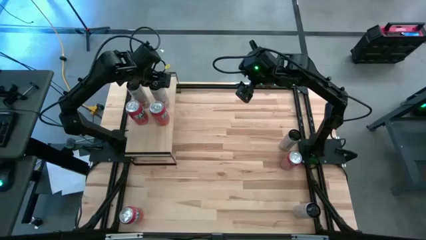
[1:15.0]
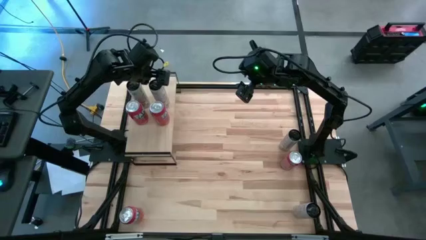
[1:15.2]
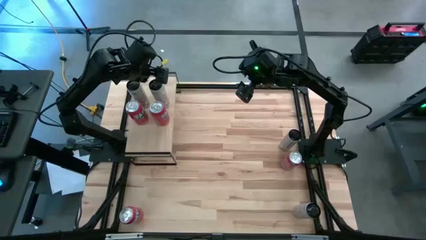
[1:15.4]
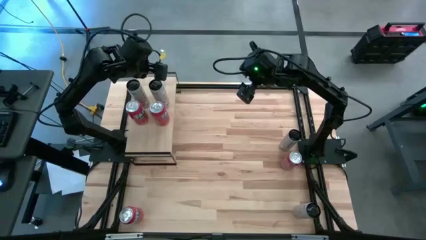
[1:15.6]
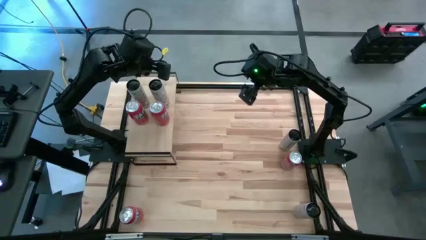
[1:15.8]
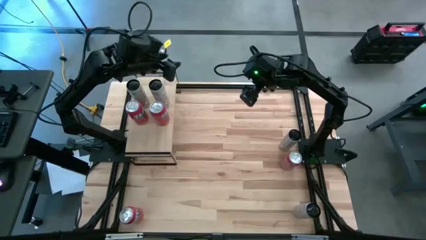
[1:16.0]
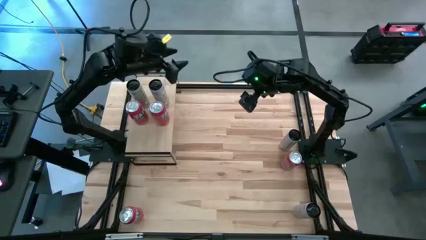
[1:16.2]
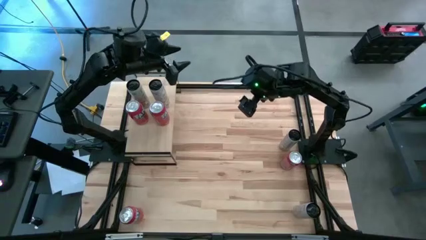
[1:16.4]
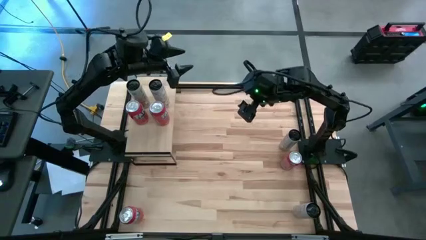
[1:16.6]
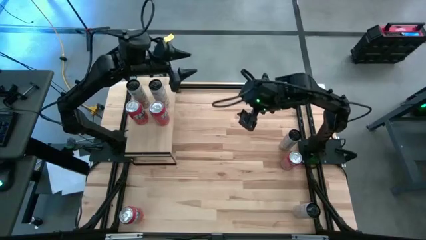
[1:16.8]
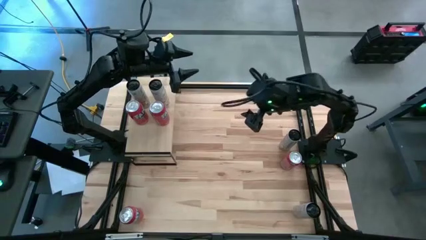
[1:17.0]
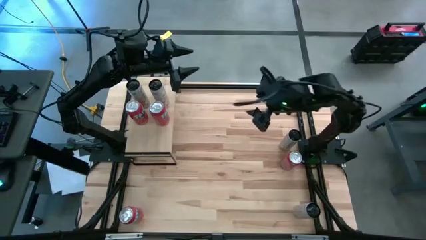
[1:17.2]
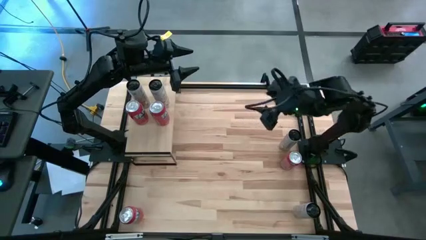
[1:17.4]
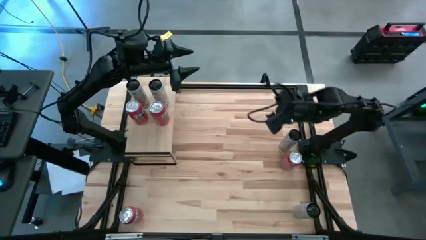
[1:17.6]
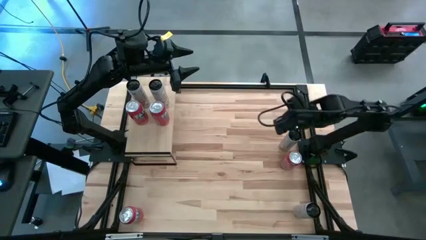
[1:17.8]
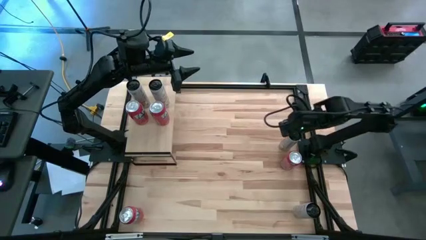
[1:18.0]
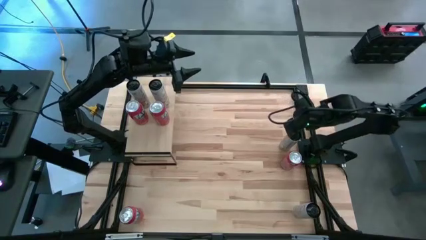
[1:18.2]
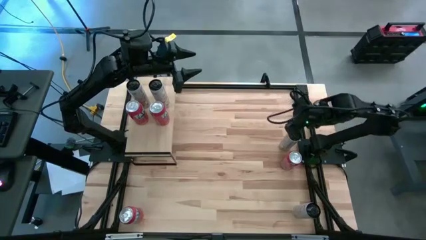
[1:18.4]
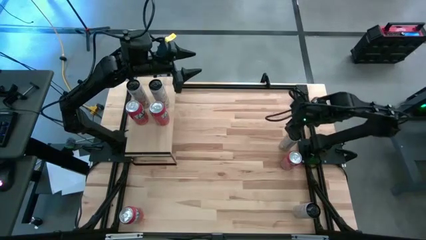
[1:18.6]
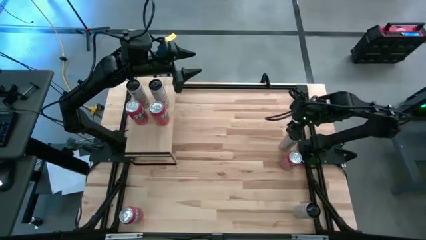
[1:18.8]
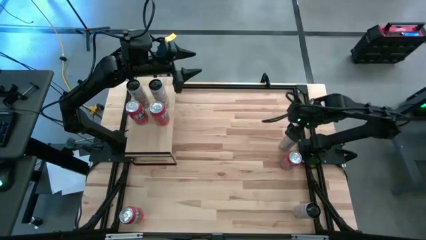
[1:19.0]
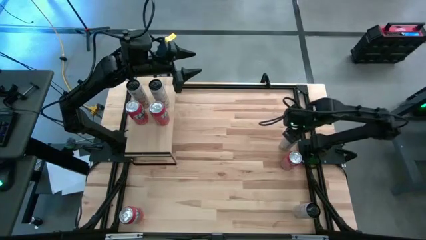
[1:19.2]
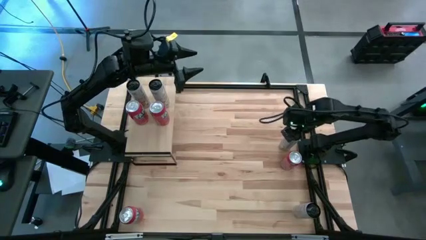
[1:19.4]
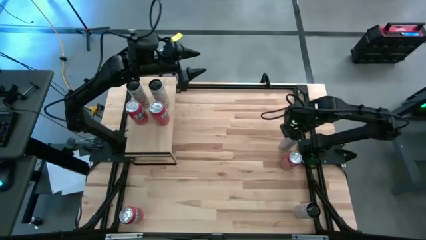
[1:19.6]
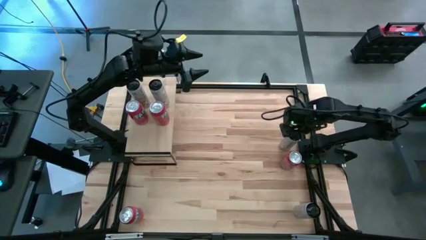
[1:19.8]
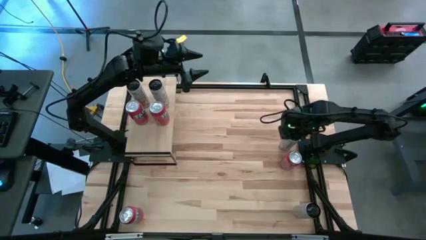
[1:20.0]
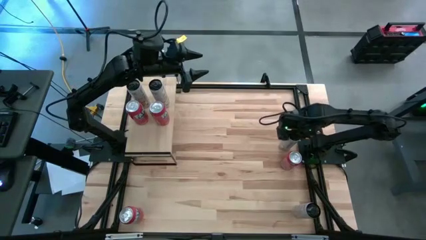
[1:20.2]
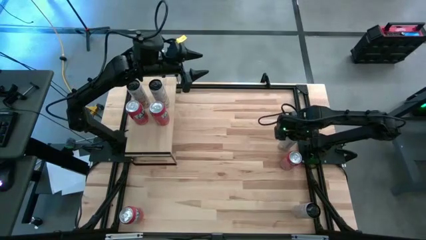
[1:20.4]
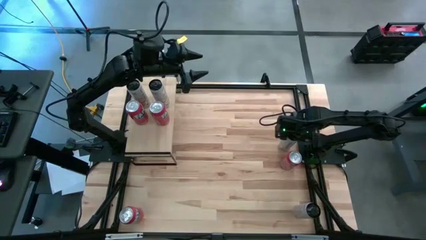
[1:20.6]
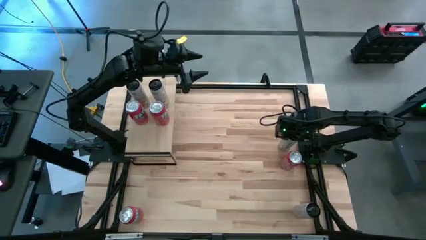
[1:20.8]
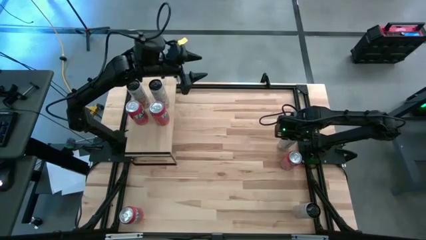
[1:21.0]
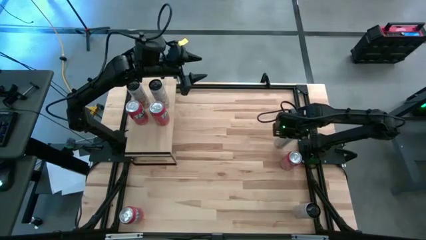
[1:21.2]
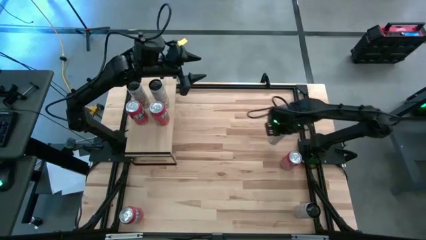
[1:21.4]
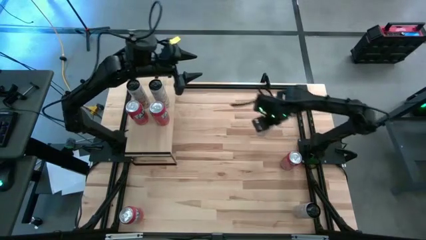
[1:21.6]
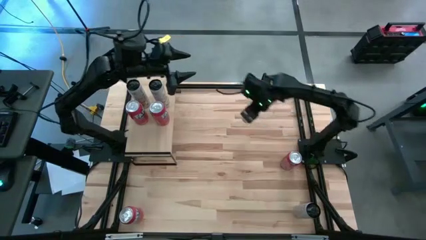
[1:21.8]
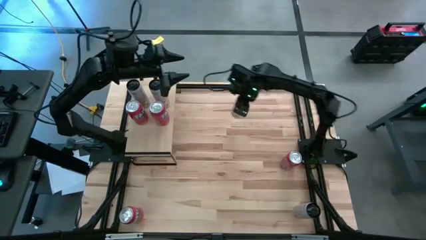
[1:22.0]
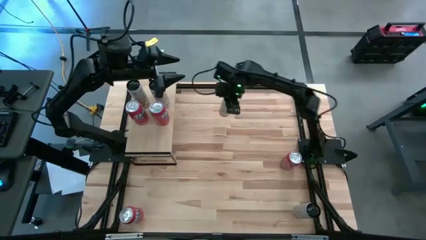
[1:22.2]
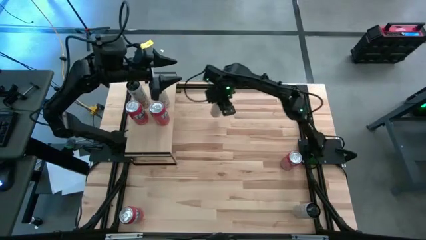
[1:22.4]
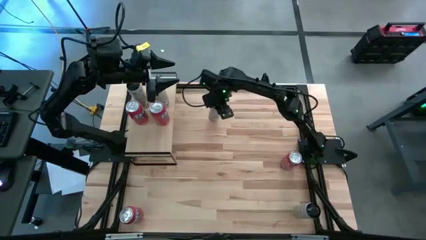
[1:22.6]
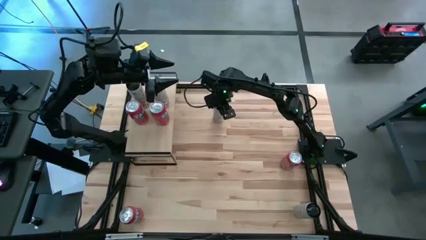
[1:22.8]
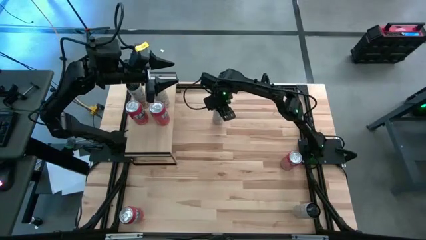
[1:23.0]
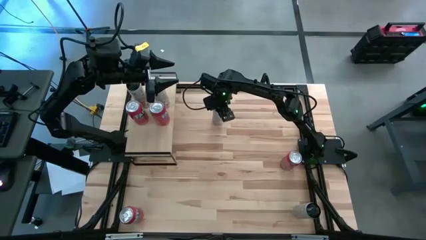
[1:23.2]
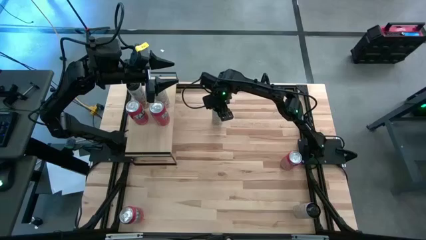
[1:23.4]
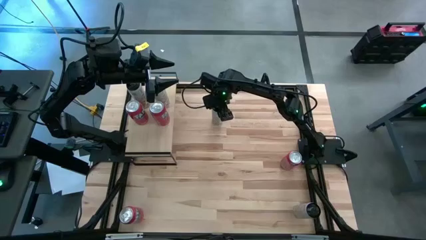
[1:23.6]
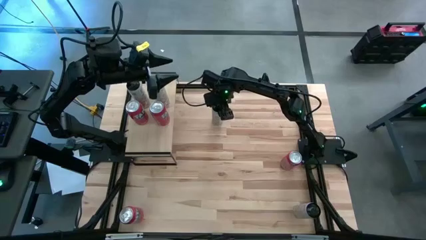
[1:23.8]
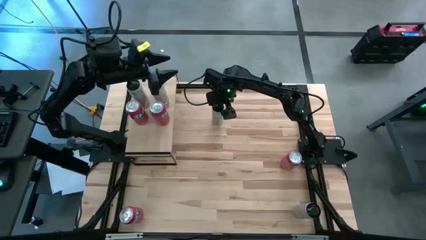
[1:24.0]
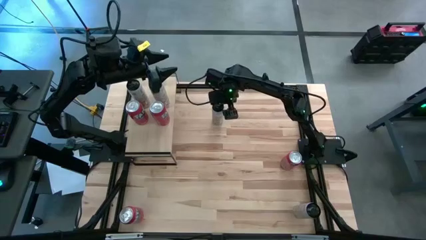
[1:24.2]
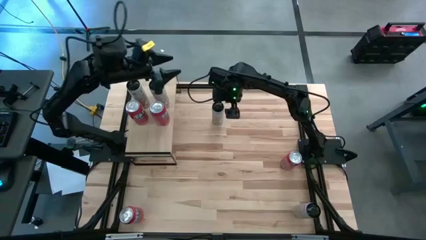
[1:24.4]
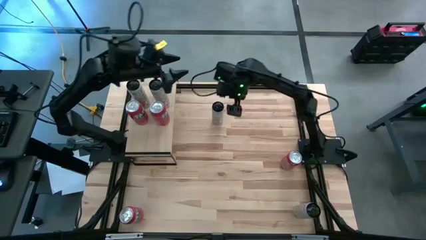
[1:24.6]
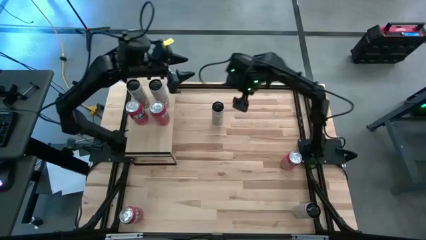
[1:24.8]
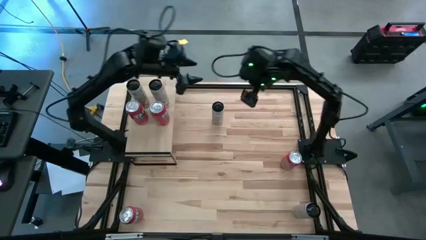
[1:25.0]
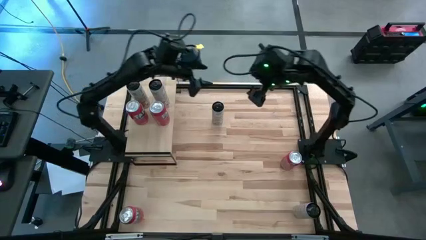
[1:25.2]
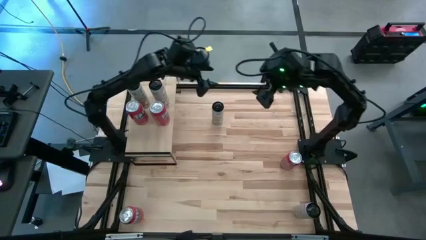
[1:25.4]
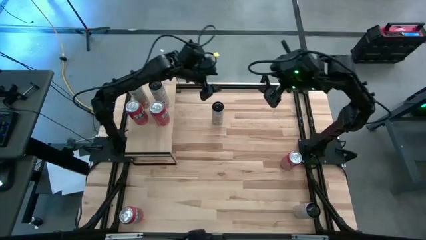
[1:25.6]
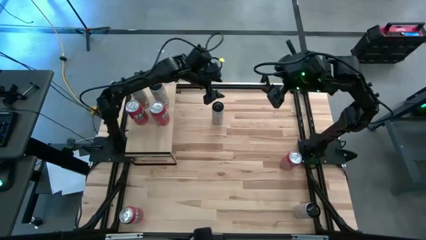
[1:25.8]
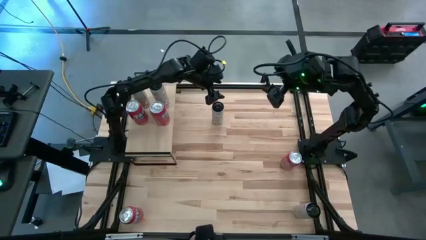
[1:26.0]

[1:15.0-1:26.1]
Task: Place canned beverage on shelf
Put the top white yellow soda can on the shelf
